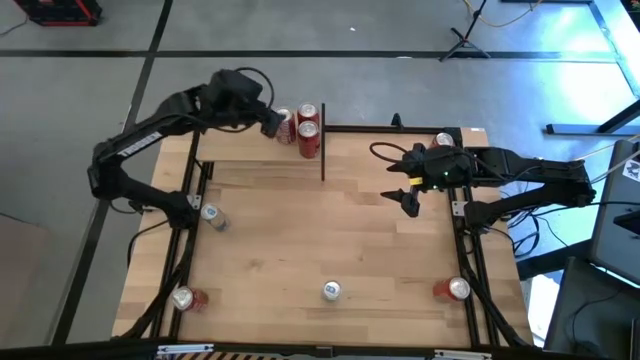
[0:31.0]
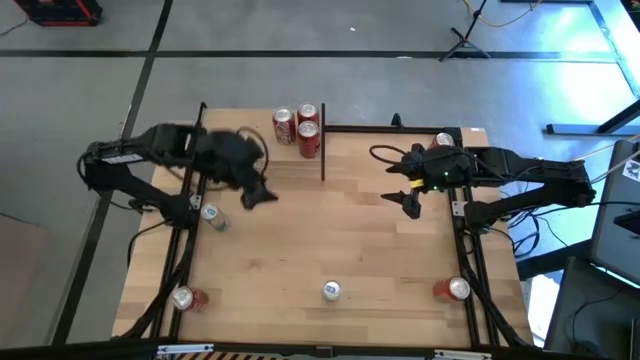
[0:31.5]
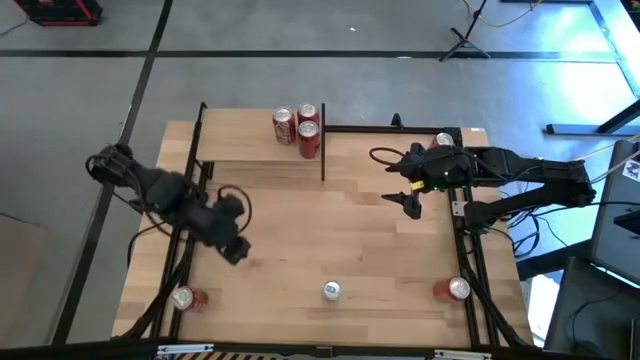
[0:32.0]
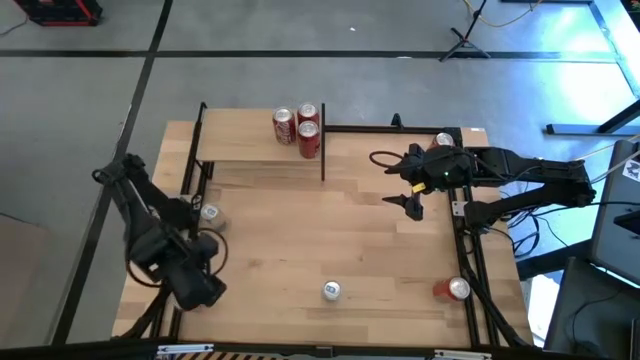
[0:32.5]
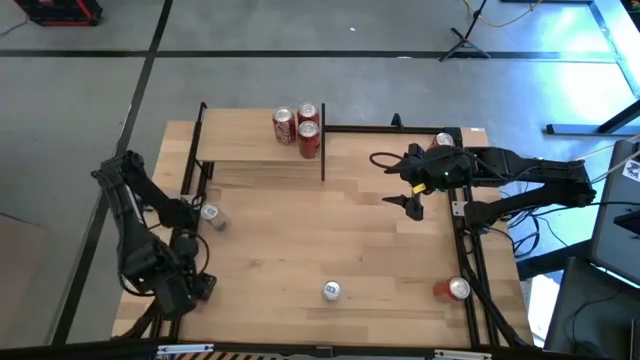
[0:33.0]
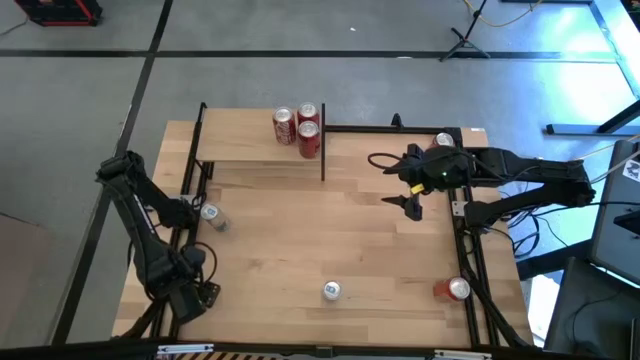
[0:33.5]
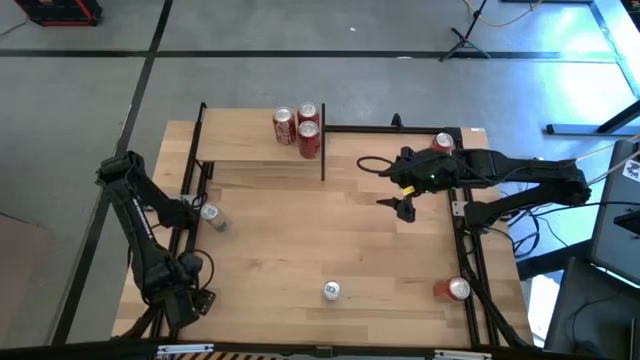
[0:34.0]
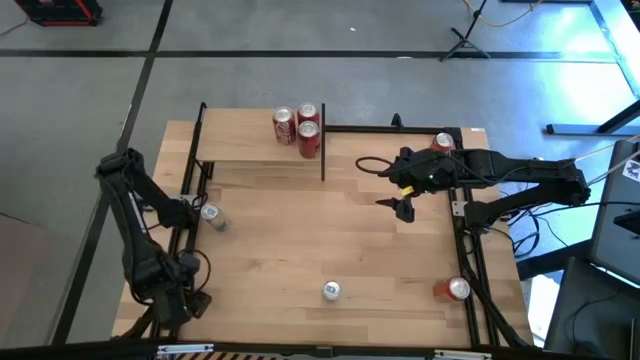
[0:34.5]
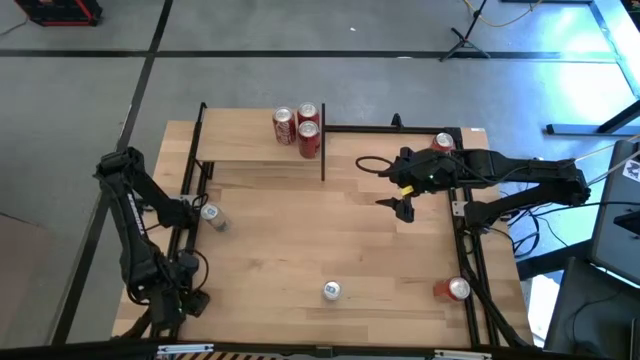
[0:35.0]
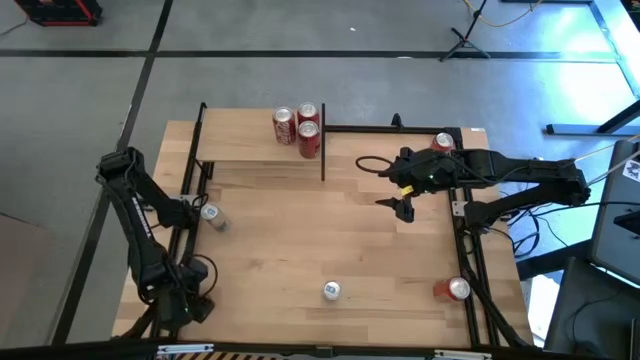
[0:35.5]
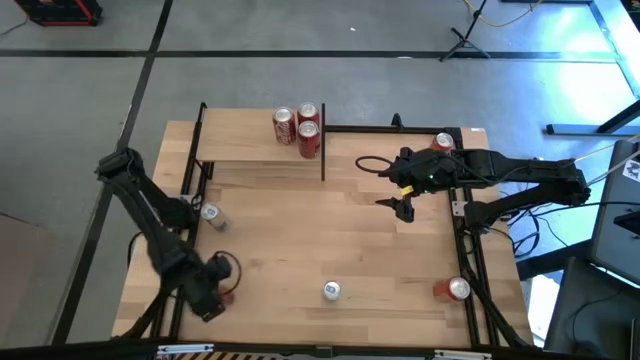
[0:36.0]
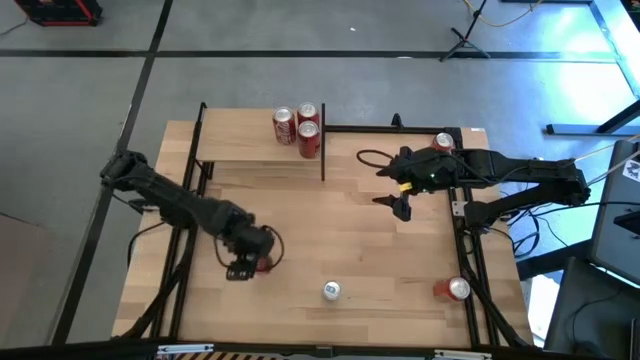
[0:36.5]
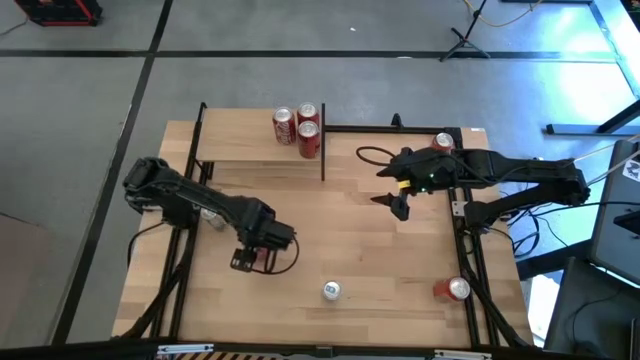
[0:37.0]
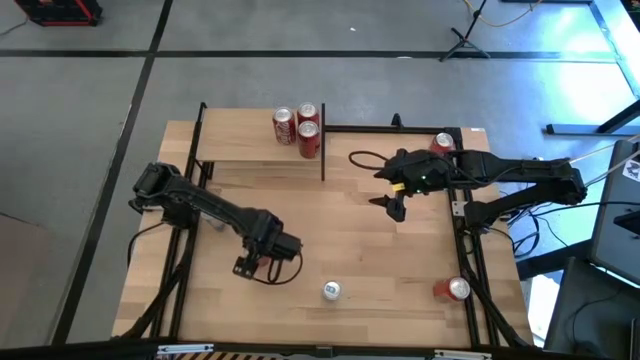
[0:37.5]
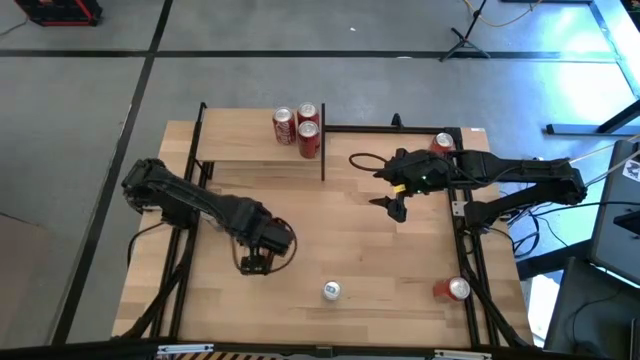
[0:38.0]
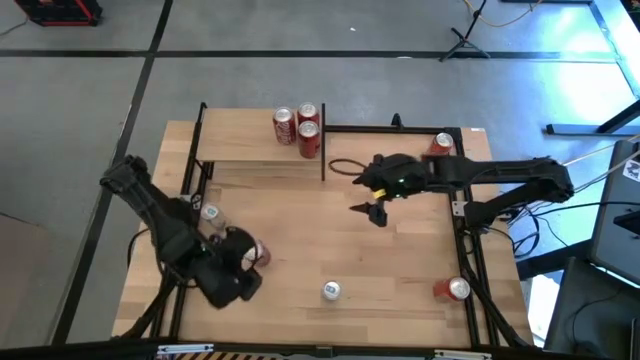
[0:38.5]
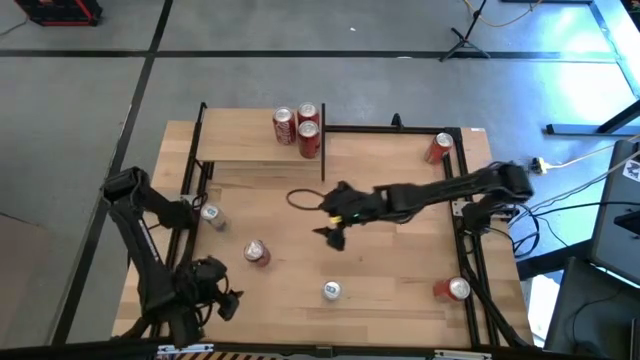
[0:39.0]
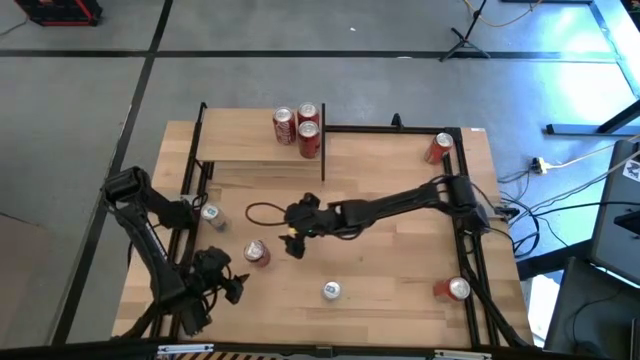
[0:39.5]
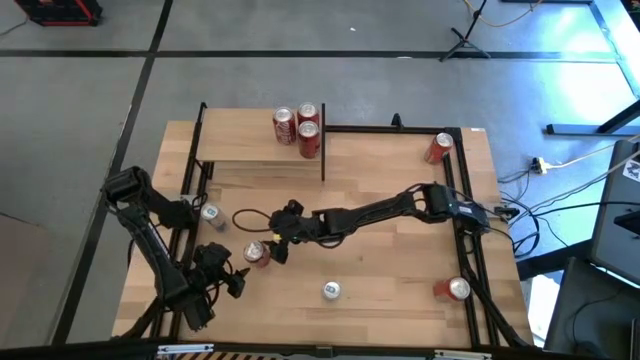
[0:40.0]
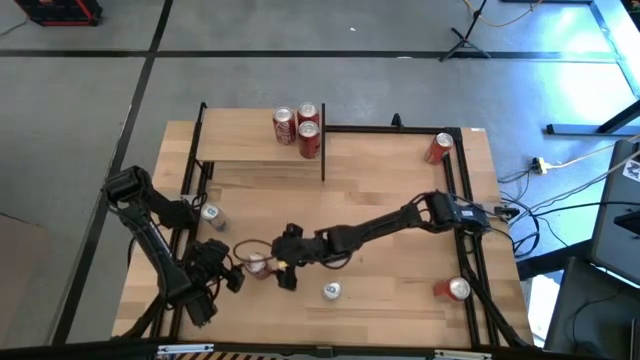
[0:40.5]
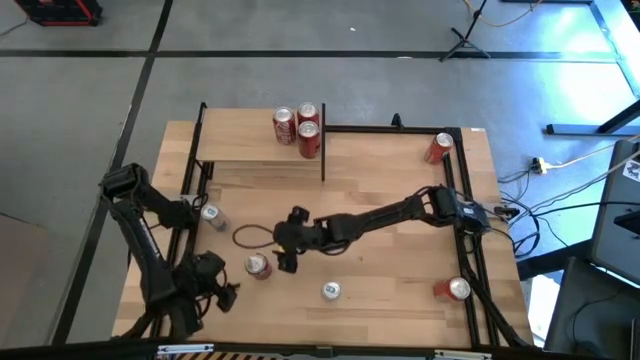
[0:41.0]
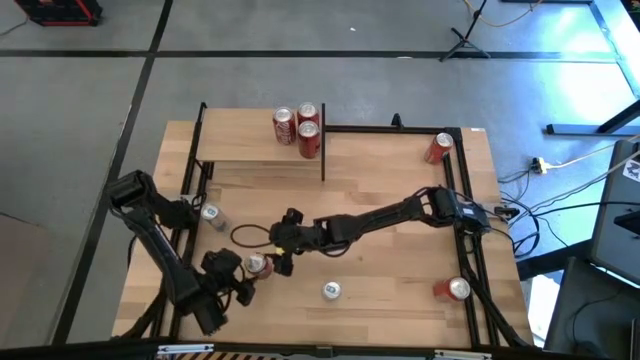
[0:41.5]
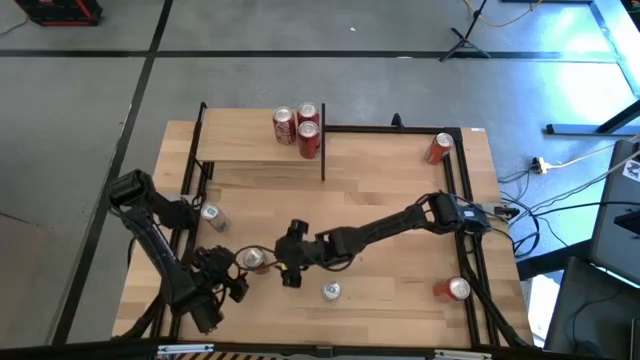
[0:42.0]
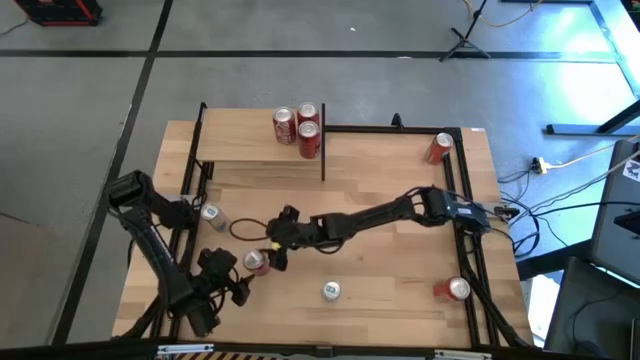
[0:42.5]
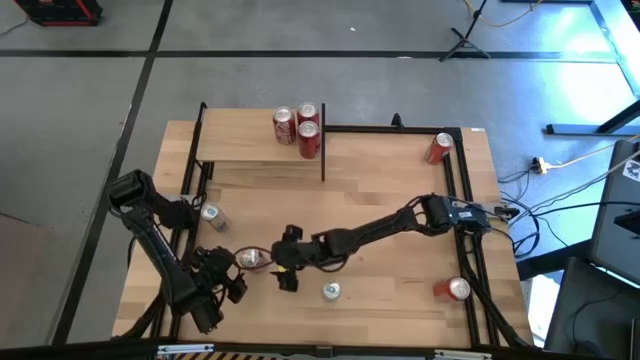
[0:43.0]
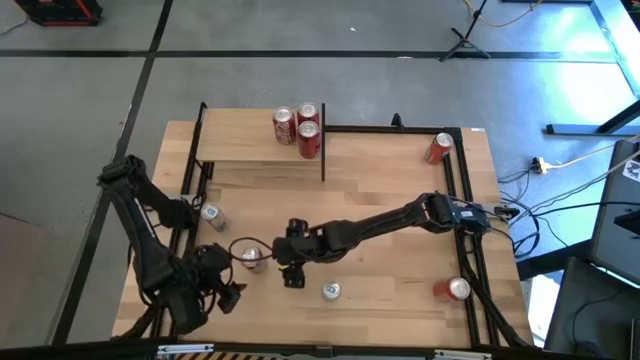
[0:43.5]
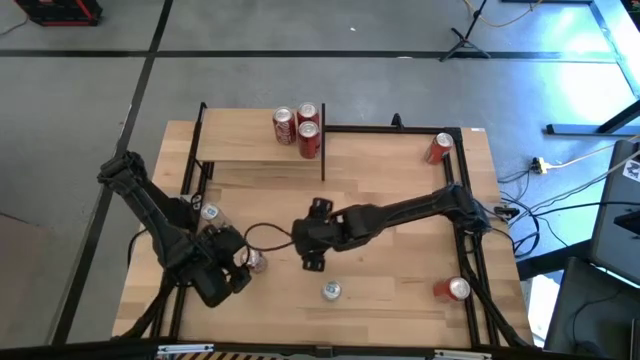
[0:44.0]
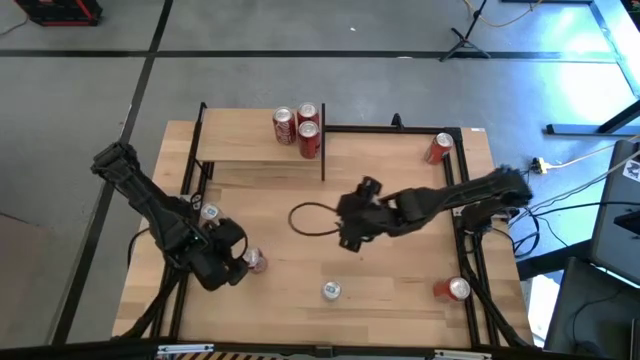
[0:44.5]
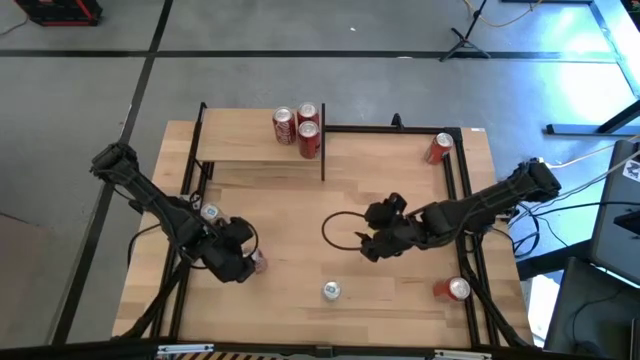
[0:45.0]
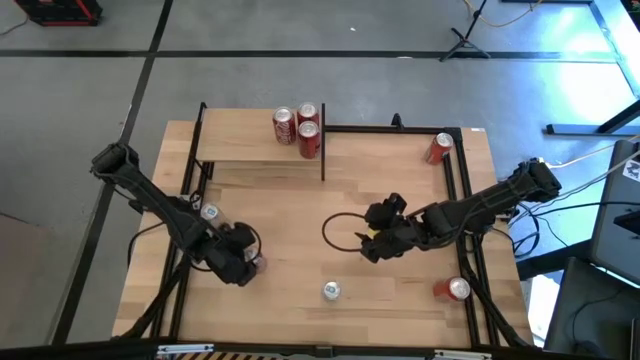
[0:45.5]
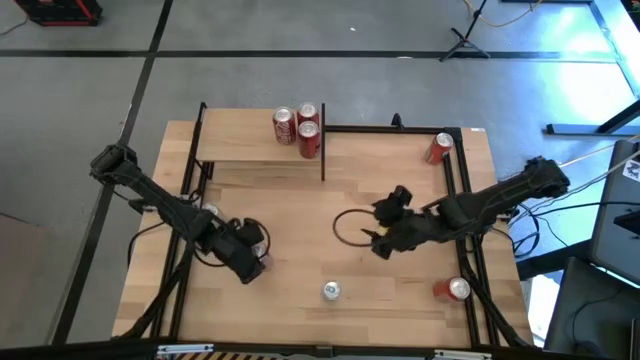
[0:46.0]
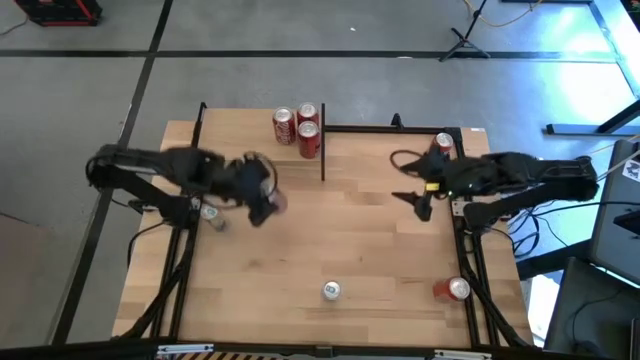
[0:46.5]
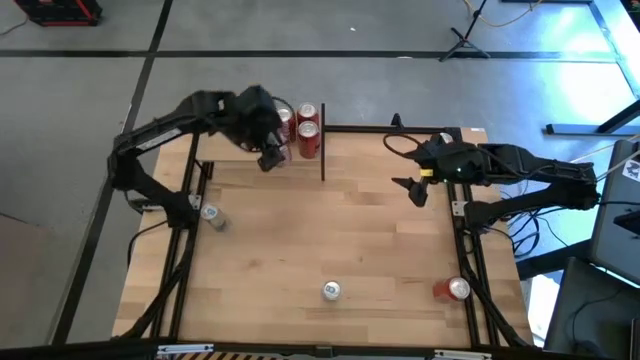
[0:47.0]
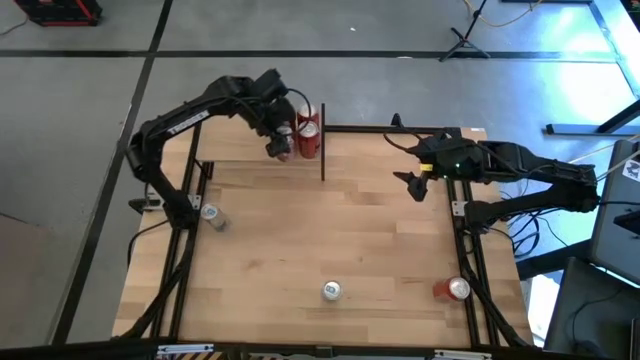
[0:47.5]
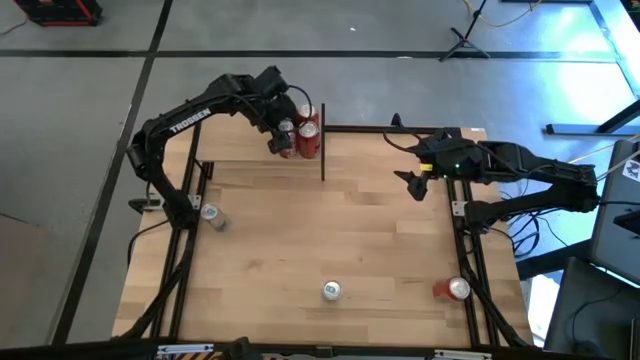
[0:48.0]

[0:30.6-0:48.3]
Task: Place canned beverage on shelf
Put the red white soda can on the shelf aligned with the other red white soda can

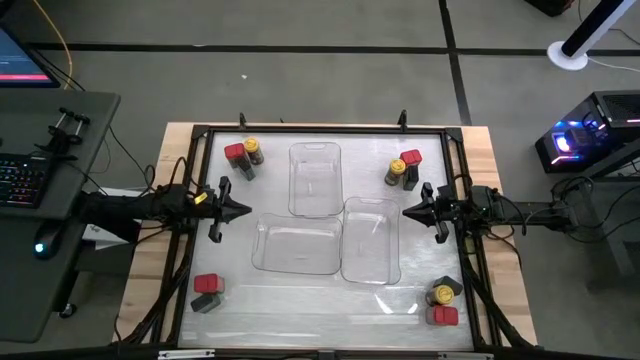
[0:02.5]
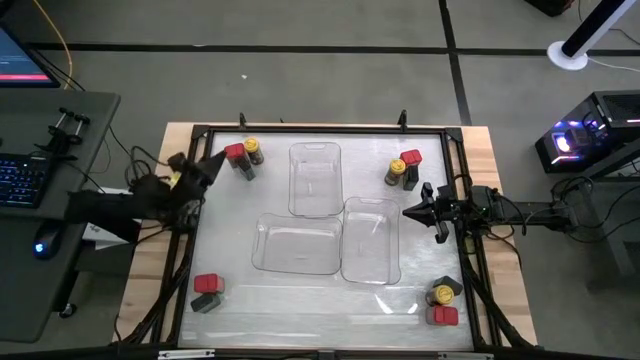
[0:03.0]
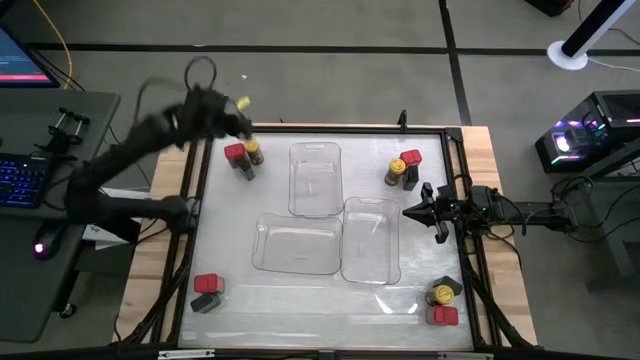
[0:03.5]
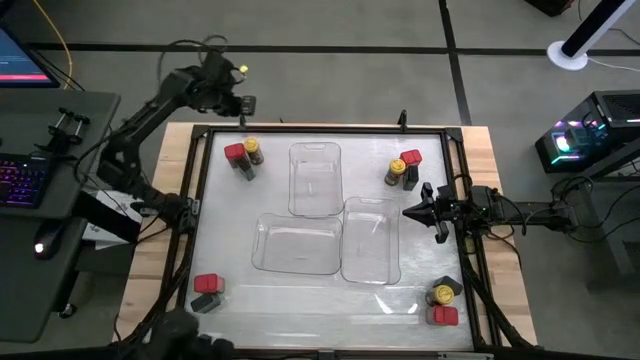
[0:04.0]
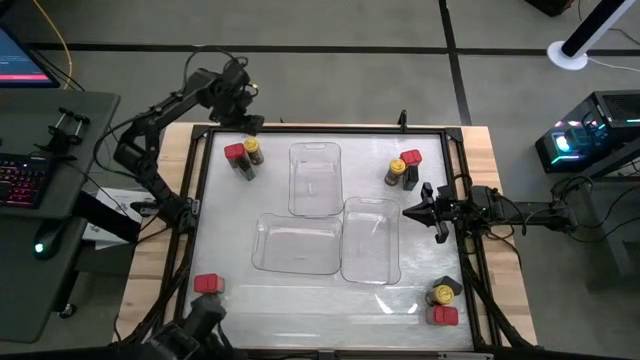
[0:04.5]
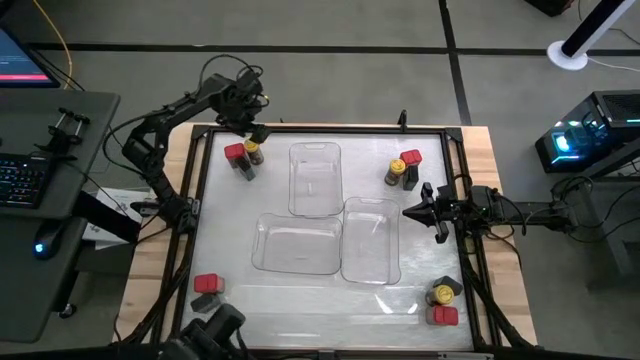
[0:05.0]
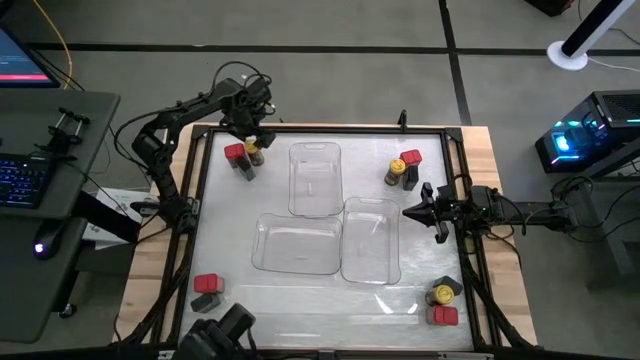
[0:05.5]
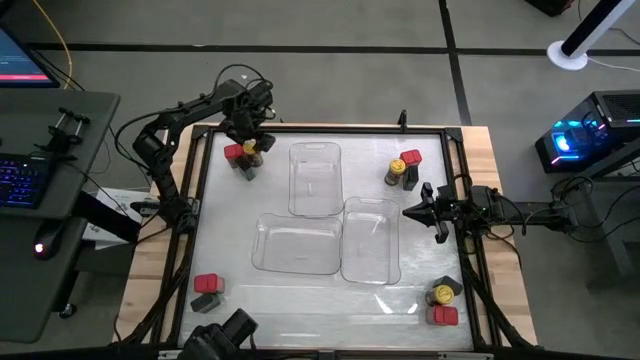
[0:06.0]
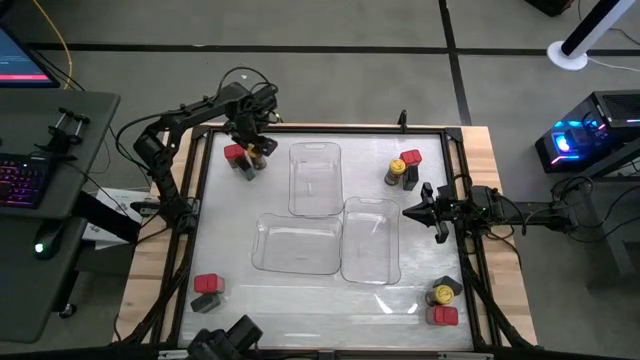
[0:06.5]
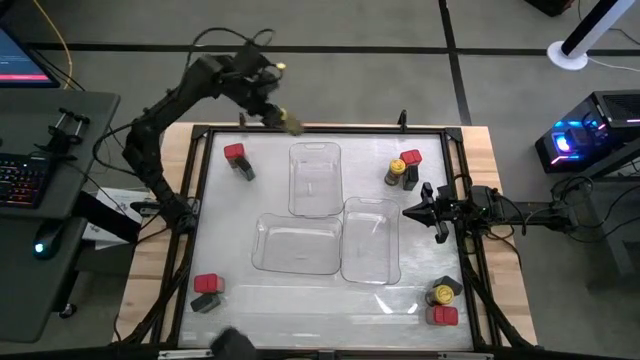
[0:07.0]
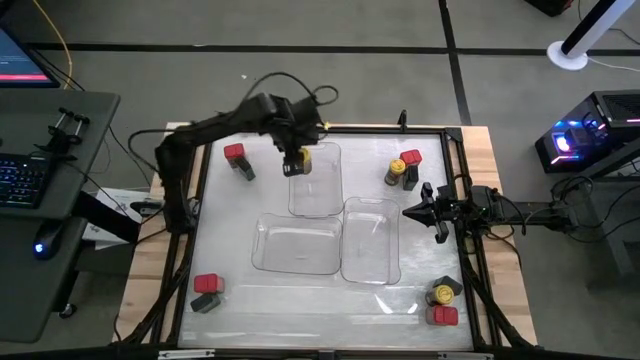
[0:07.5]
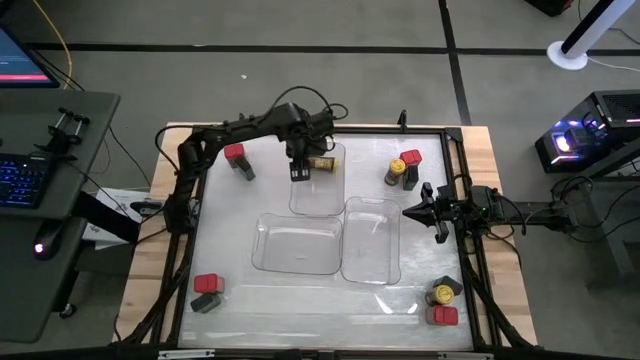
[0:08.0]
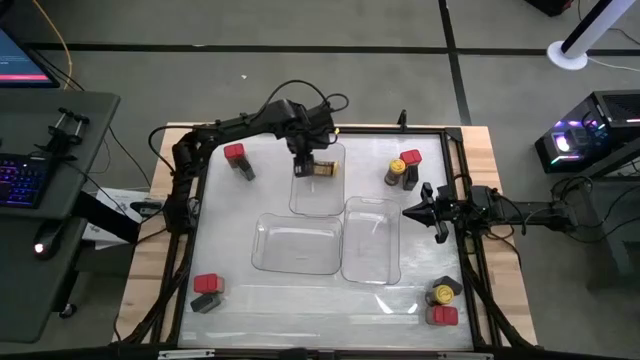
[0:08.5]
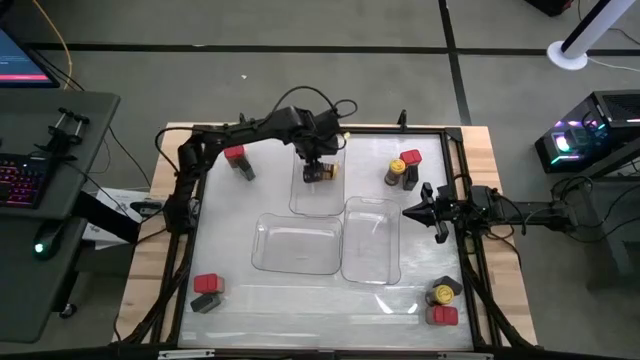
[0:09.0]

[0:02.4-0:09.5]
Task: Sort spices by type
Put the top left yellow seasoning bottle into the top transparent bin
